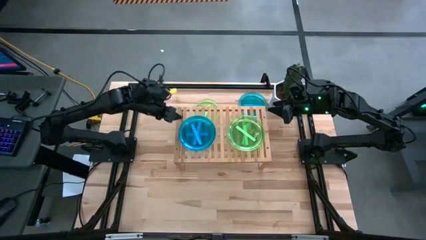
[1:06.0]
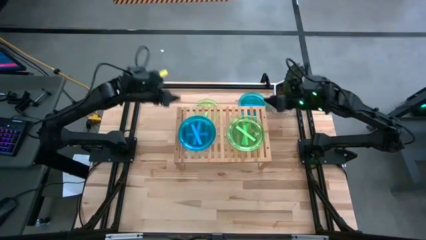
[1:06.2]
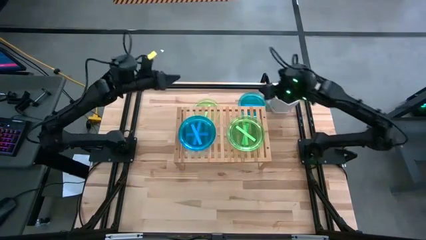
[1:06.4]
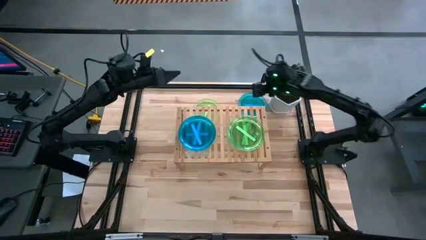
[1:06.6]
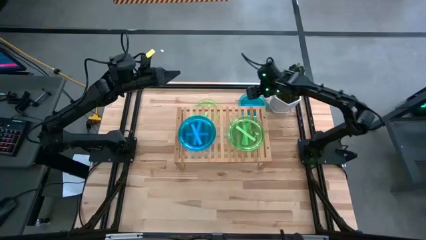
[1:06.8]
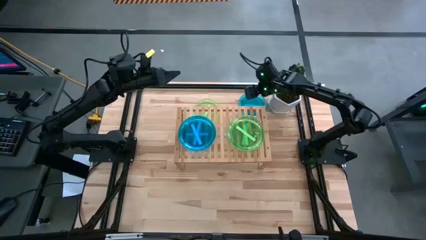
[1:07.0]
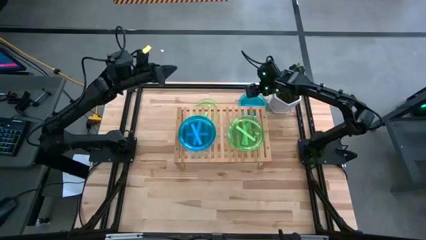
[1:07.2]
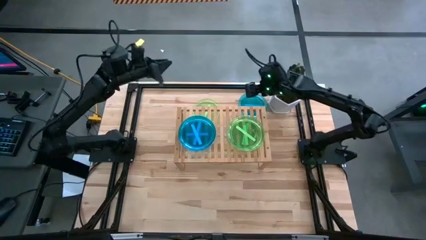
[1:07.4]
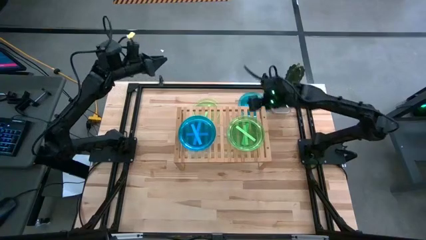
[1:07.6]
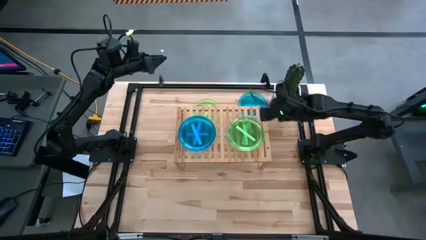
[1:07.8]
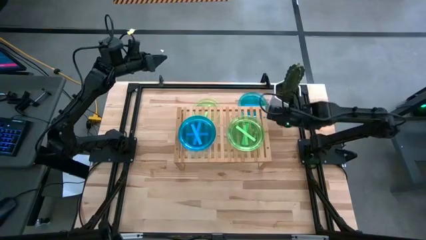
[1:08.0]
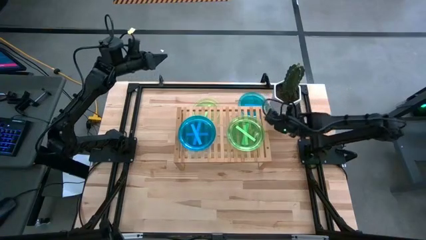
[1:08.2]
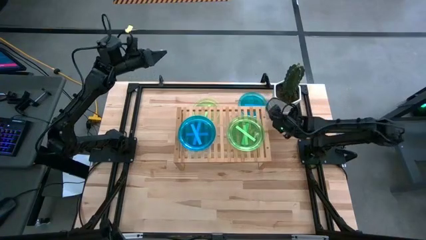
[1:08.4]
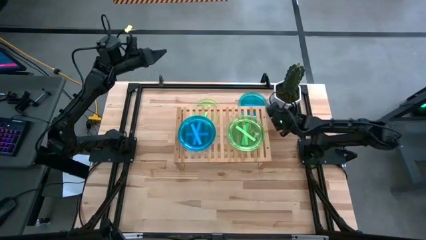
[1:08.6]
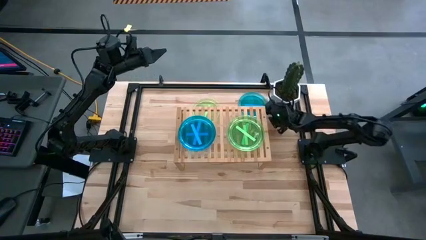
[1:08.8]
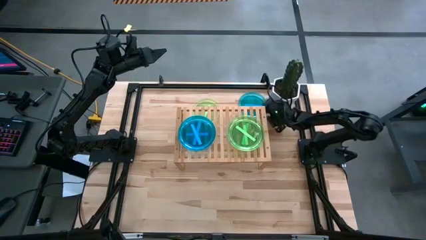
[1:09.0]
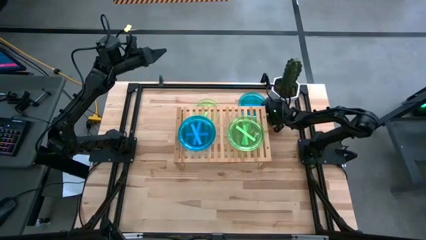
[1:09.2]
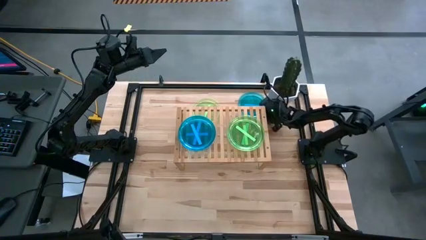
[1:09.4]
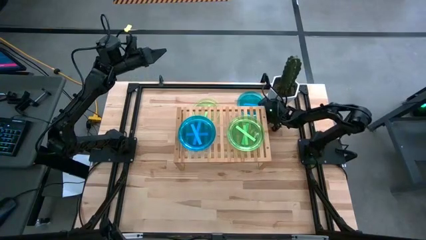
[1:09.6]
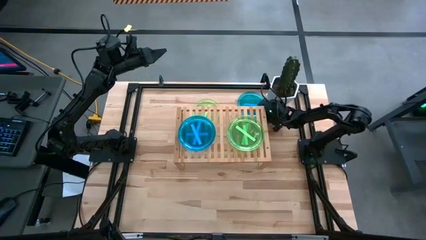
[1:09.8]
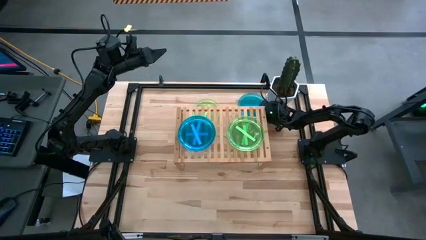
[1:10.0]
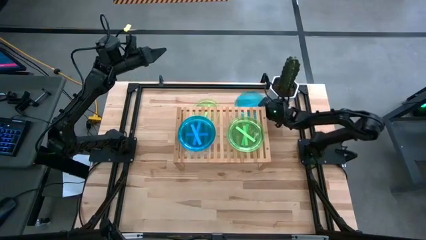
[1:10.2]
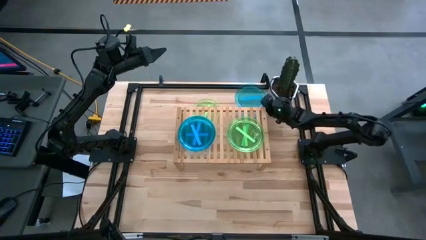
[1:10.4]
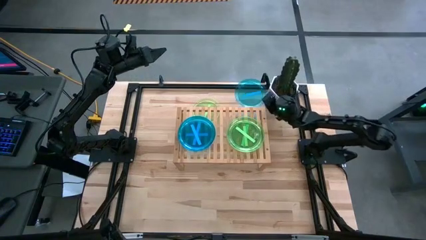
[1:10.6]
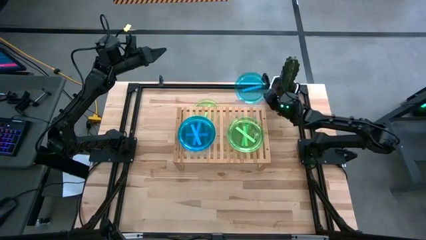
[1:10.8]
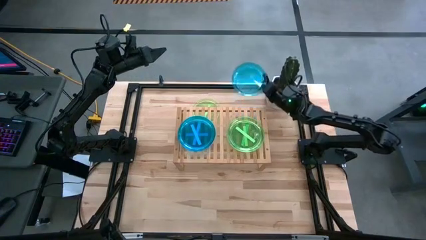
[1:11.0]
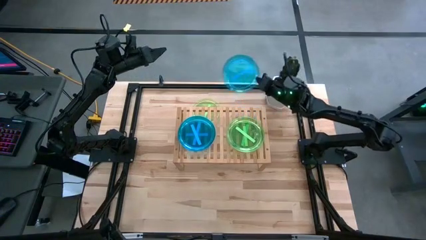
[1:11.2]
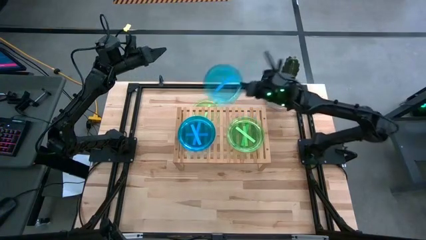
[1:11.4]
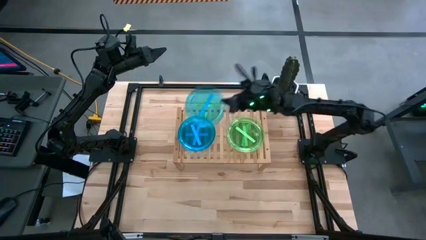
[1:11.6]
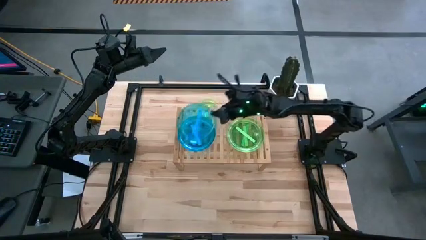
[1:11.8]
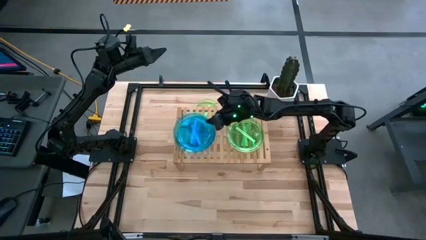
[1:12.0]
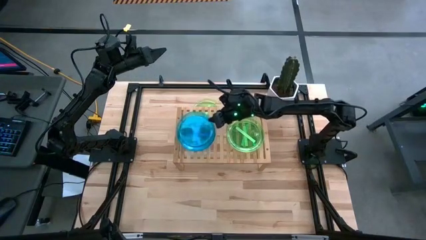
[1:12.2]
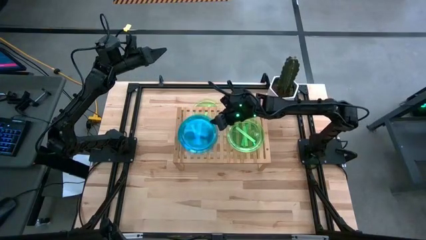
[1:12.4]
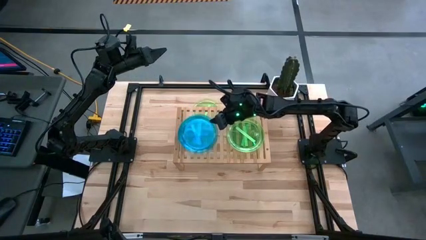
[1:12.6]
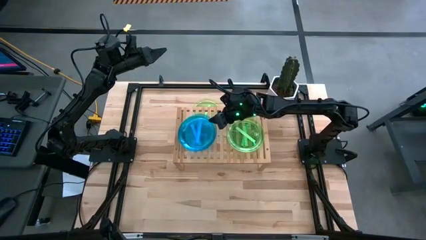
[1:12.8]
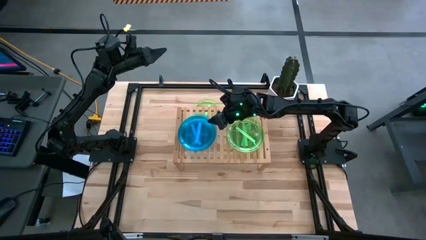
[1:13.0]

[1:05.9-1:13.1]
Task: Place and stack plates onto a shelf
Stack the blue plate on top of the other blue plate on the shelf

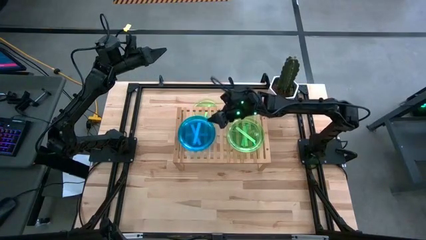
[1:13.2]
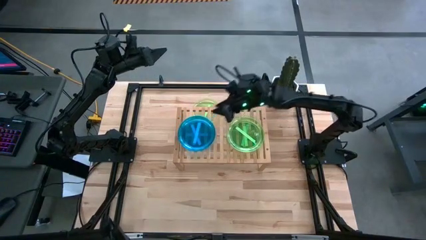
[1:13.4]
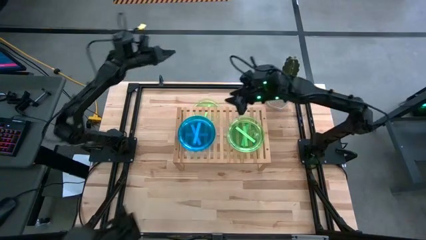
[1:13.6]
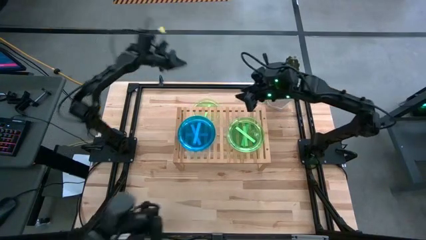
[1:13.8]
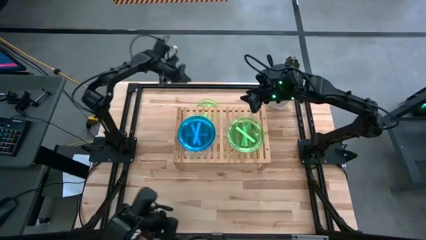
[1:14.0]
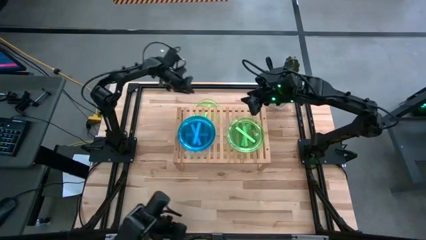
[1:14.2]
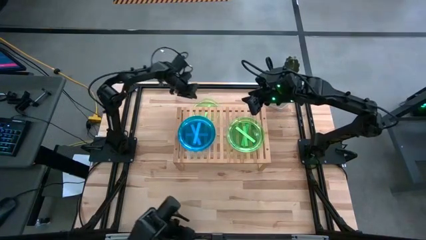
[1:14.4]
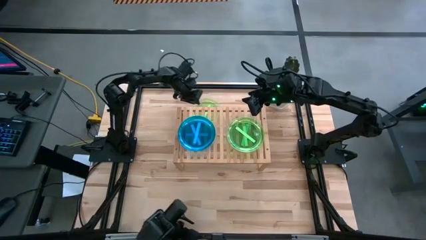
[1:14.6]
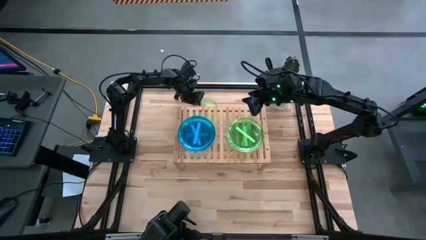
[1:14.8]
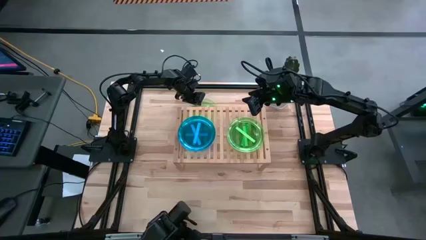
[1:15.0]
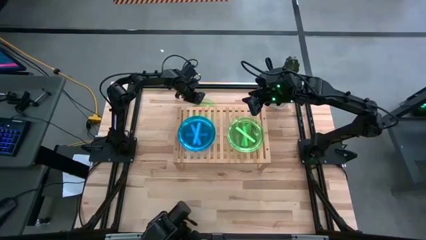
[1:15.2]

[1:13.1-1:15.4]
Stack the green plate on top of the other green plate on the shelf

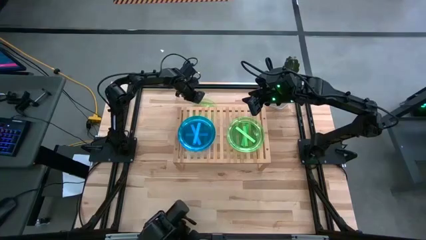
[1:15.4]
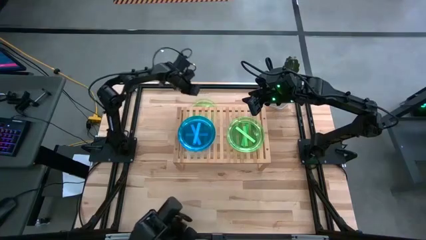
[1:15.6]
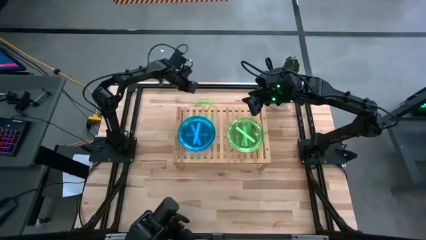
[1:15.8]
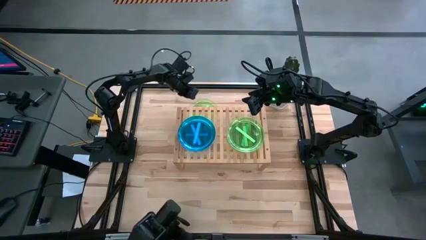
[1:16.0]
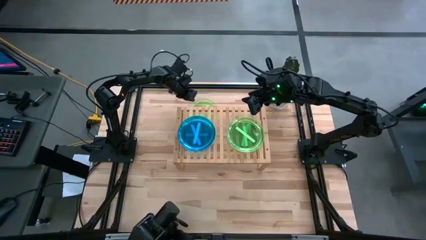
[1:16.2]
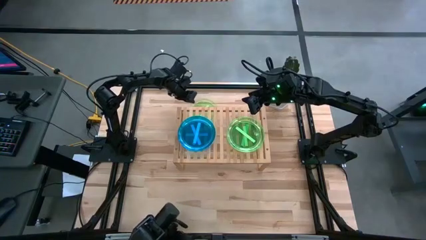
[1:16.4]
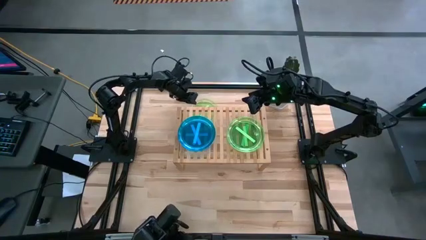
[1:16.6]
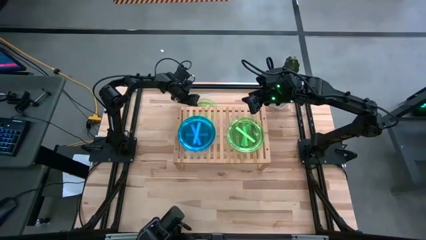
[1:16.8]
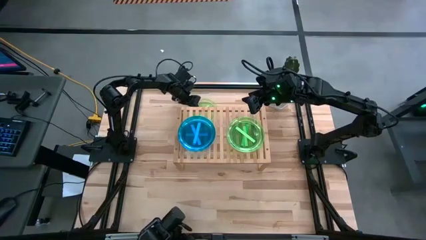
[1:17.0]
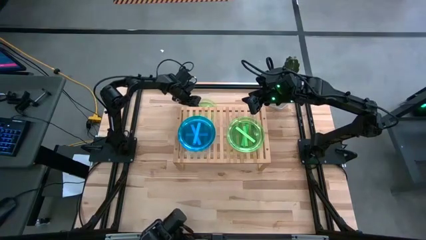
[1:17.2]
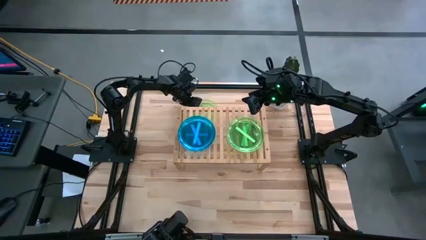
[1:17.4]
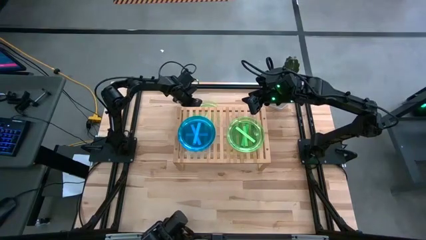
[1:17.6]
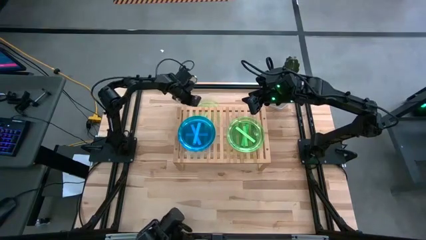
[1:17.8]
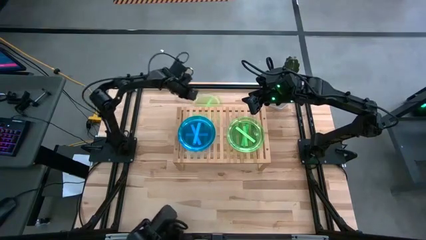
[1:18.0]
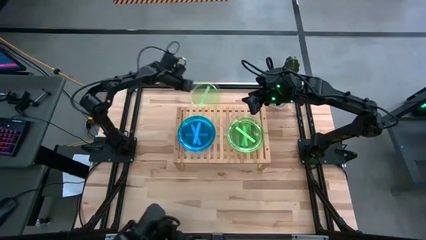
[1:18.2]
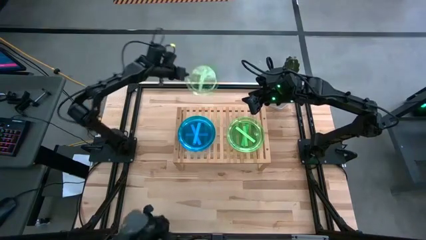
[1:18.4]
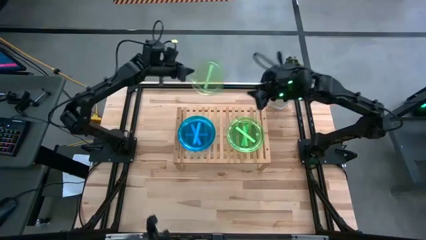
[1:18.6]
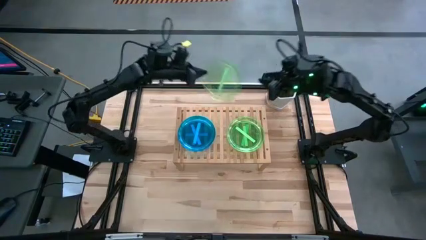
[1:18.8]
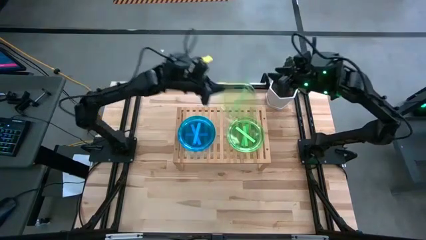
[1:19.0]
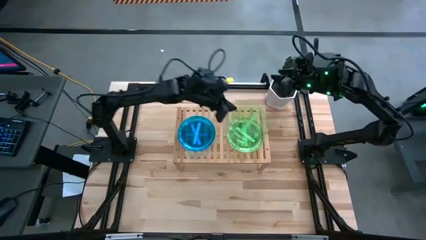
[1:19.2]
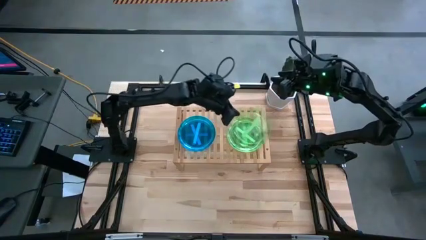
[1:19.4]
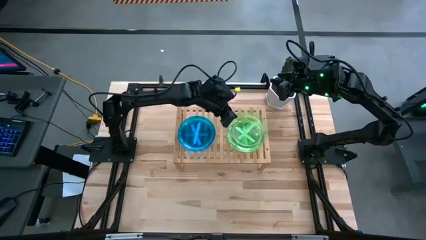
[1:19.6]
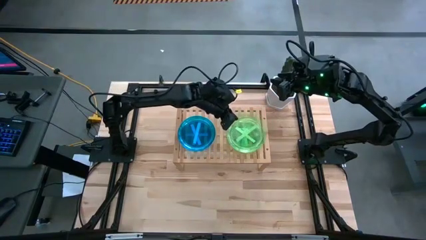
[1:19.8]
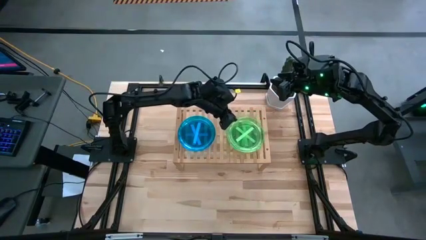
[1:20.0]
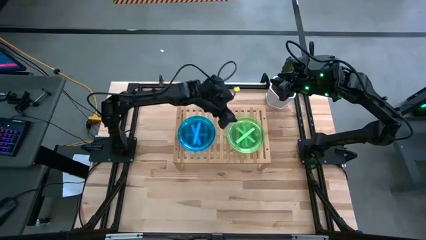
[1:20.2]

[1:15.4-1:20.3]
Stack the green plate on top of the other green plate on the shelf
